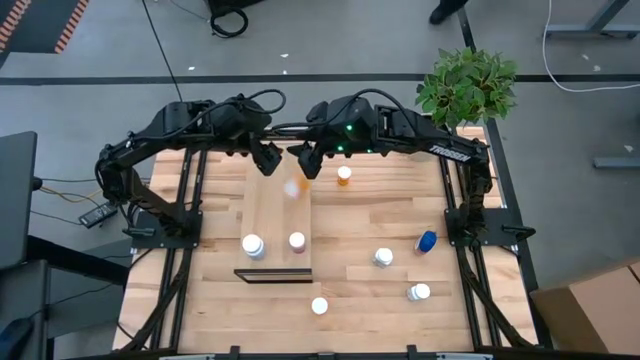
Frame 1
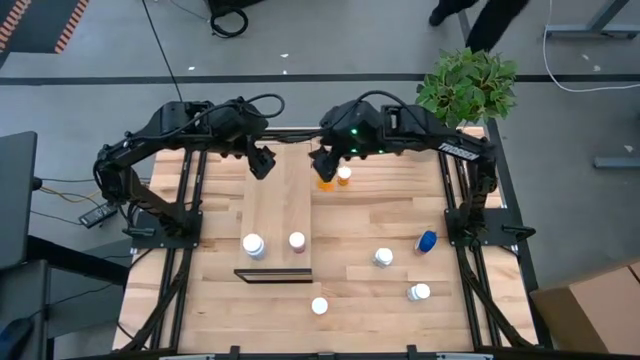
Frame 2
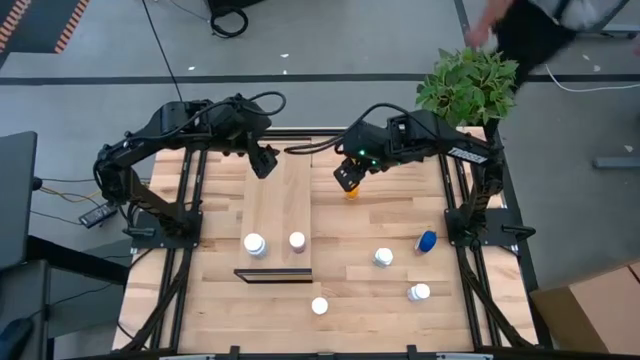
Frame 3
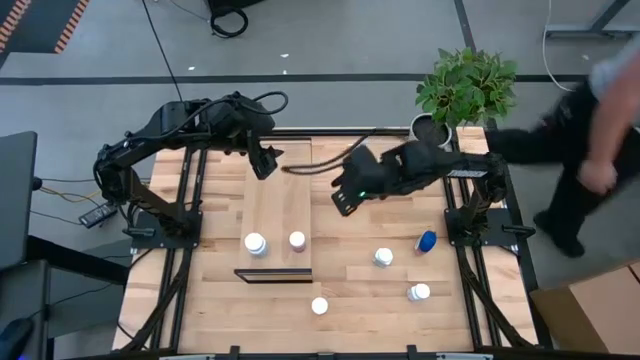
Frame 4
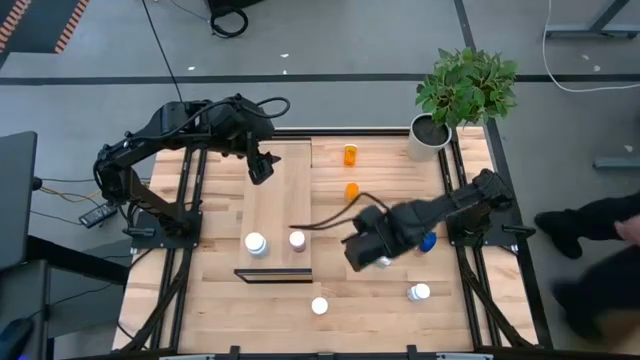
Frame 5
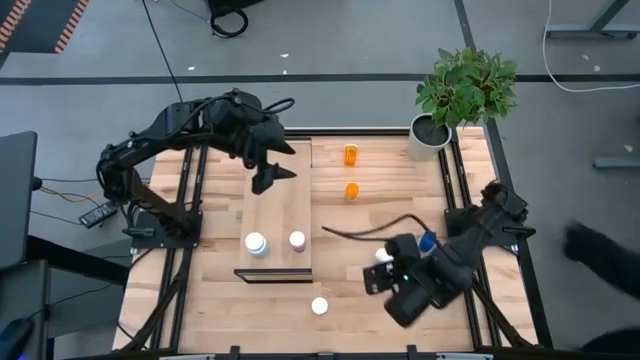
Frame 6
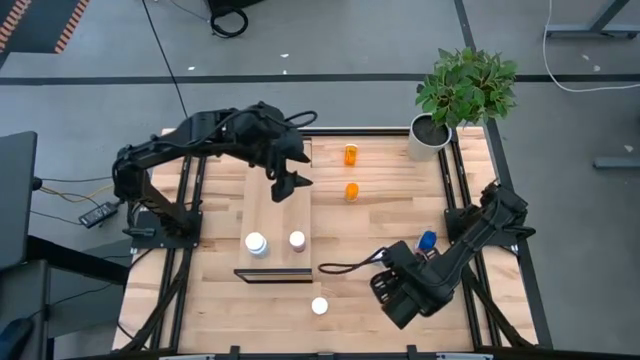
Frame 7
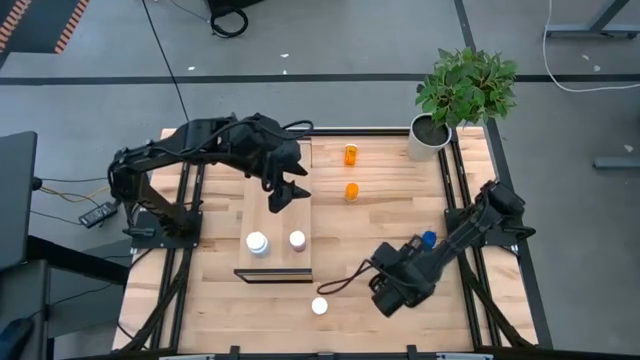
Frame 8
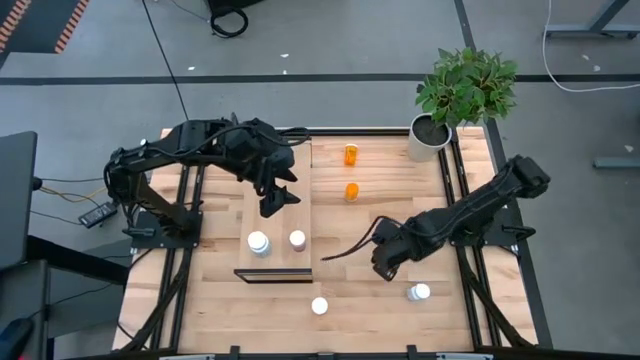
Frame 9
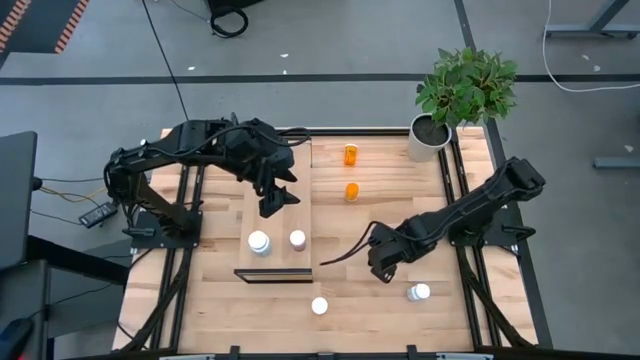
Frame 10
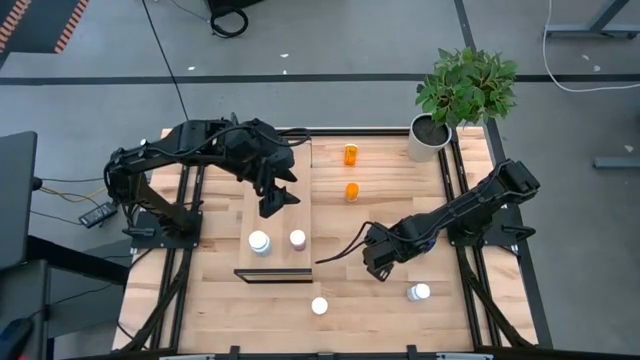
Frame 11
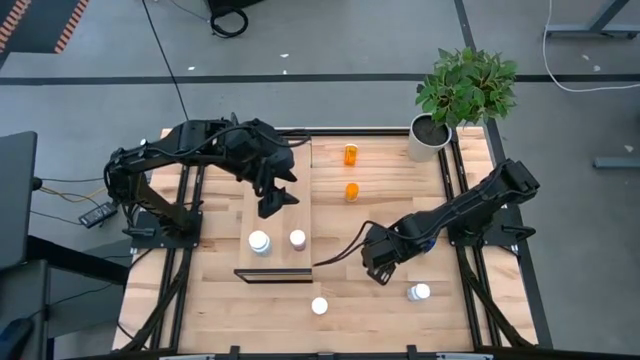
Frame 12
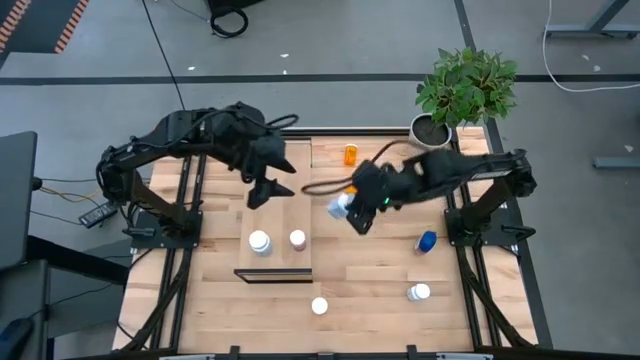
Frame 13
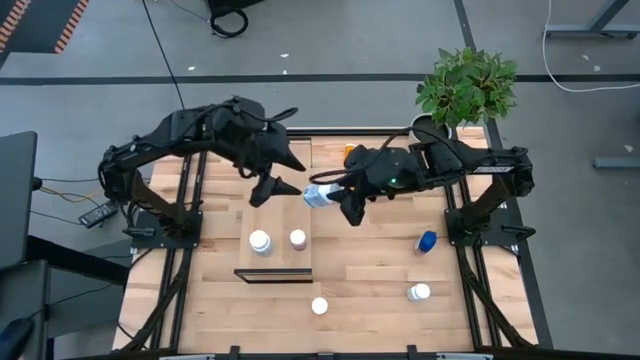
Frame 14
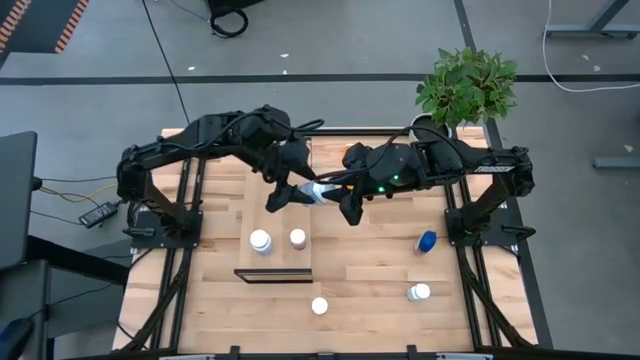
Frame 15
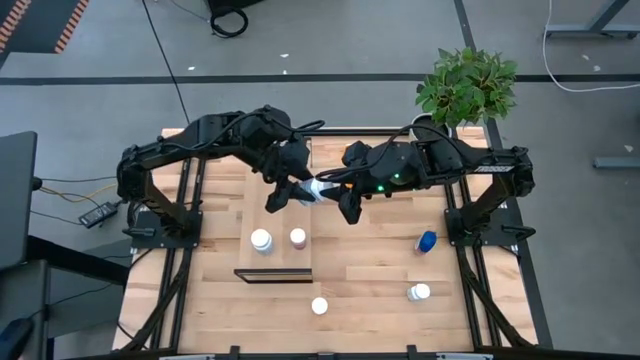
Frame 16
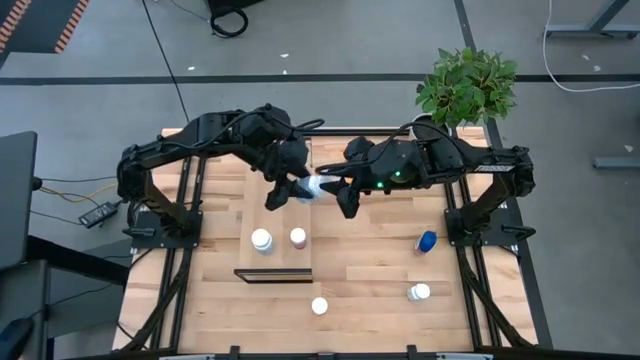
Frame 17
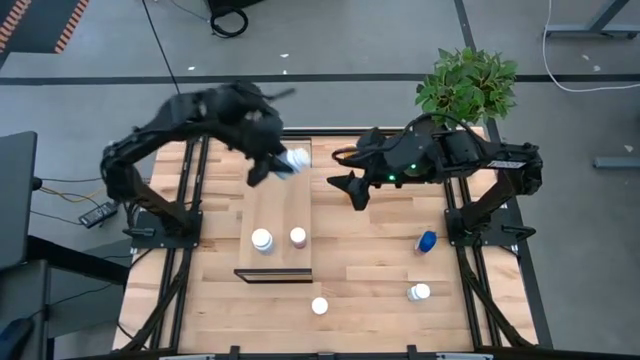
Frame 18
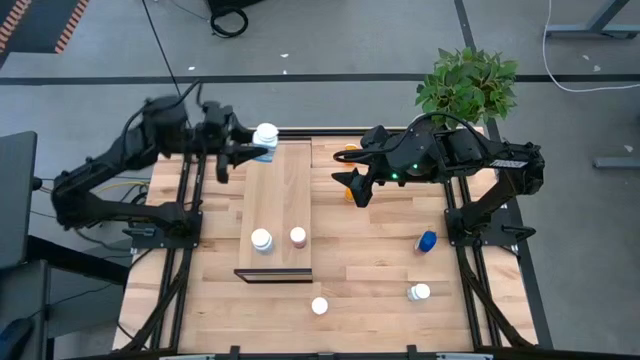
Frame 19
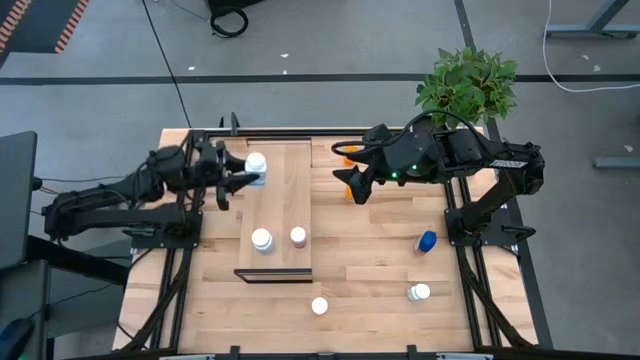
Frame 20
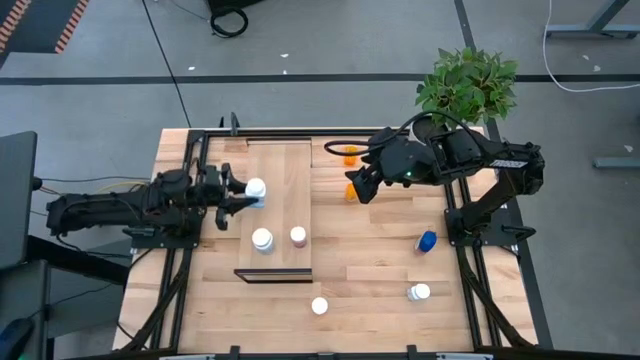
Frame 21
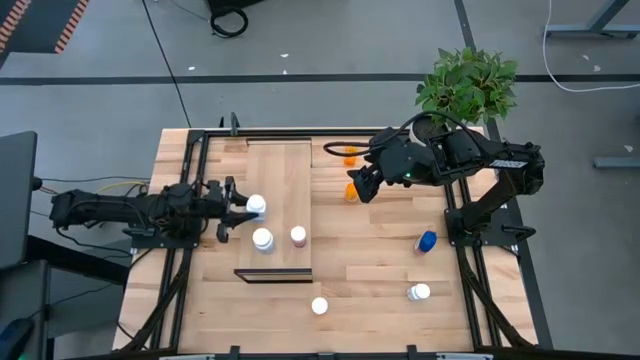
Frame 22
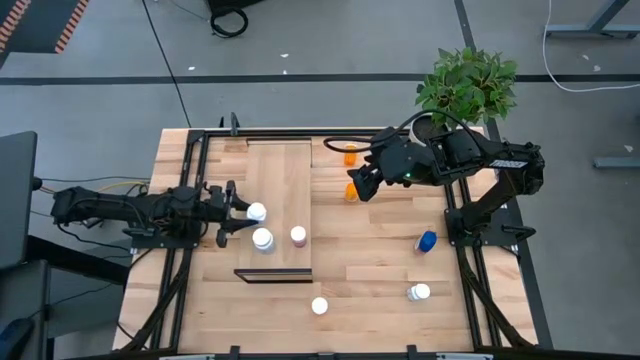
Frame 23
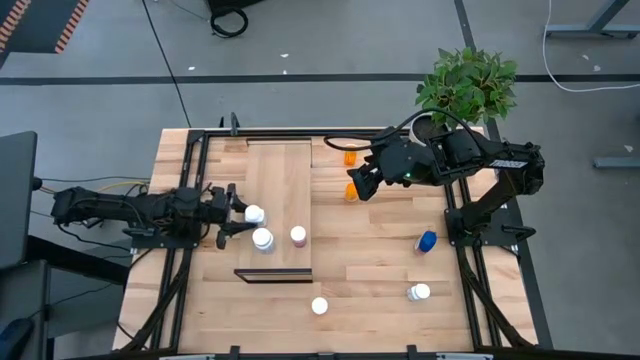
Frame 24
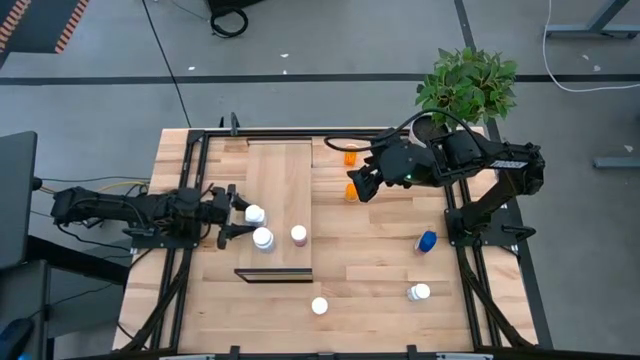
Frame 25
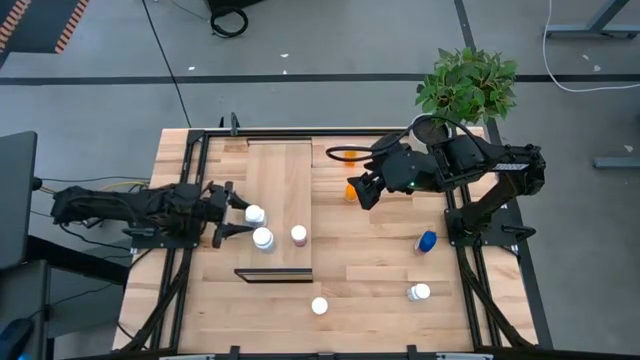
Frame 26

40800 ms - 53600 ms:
Task: Pick and place medicine bottles onto shelf by color
Put the top white pill bottle on the shelf
